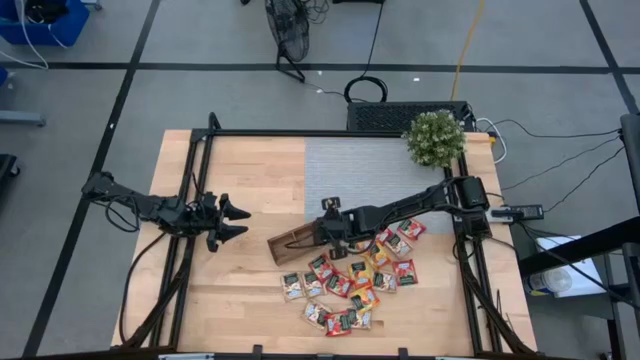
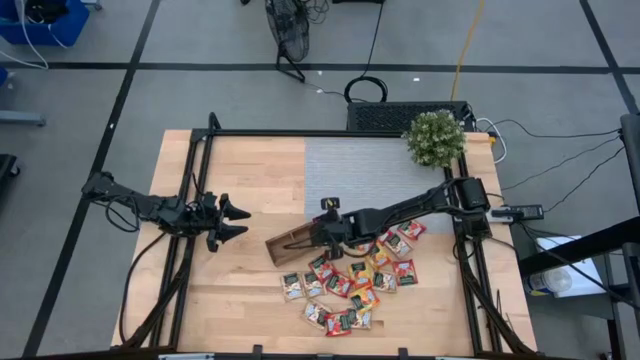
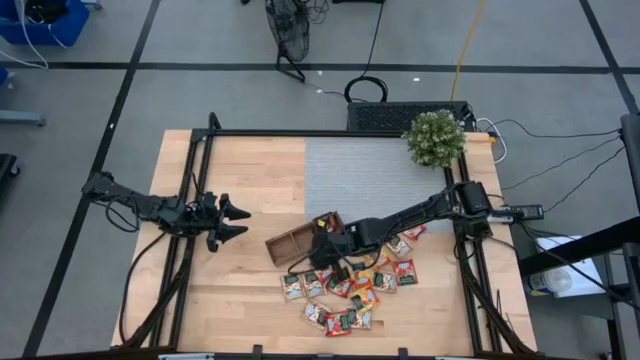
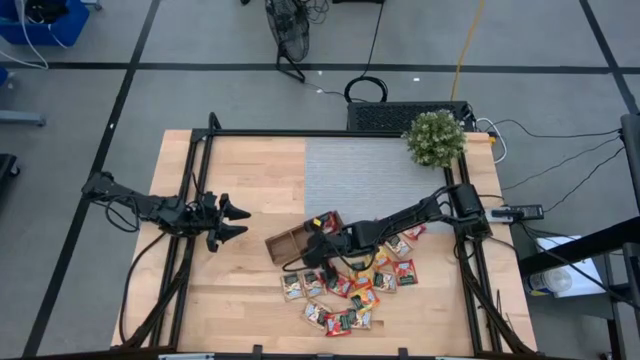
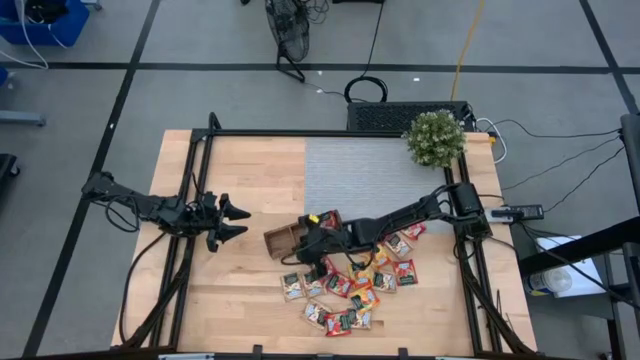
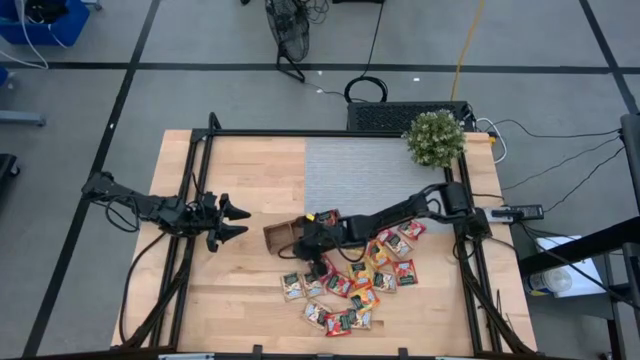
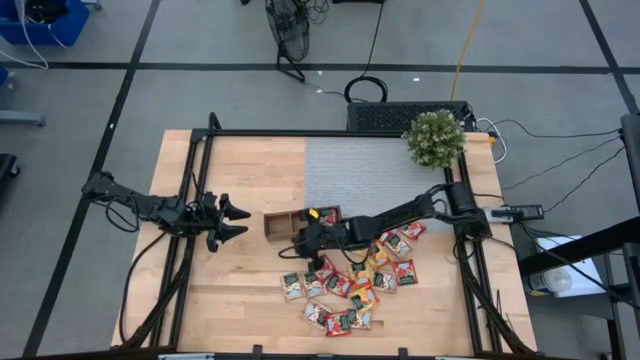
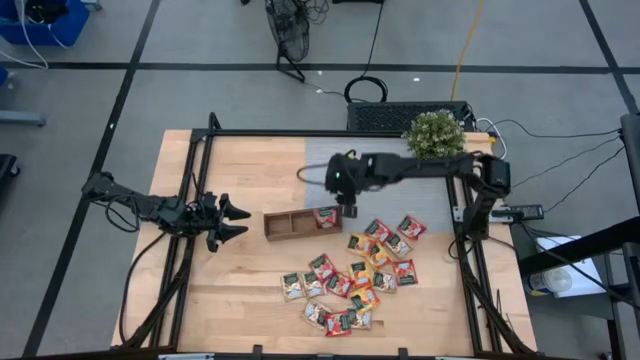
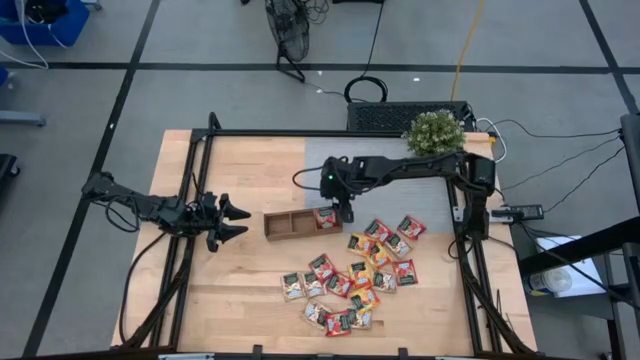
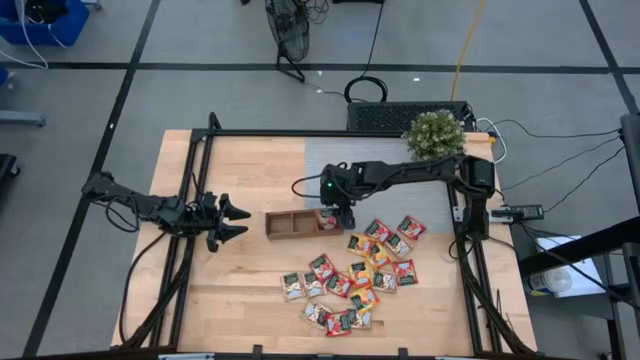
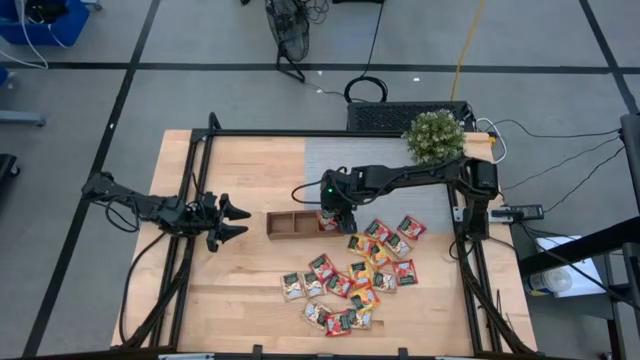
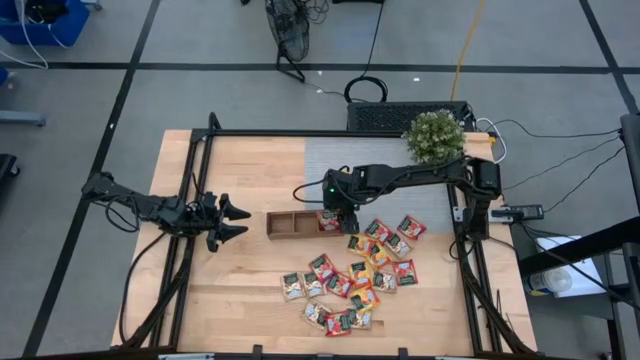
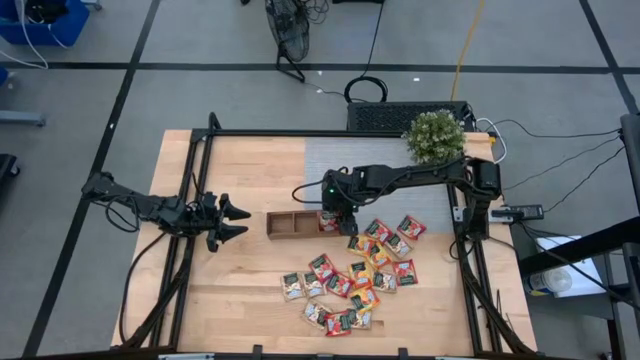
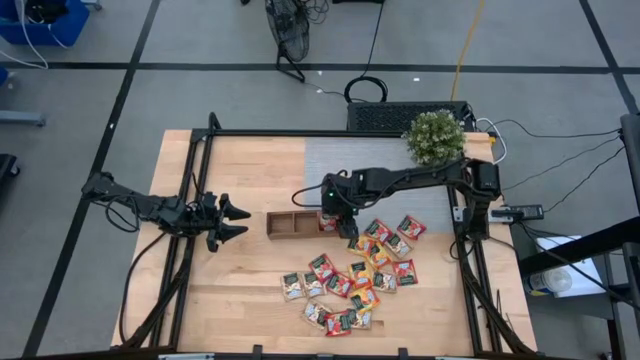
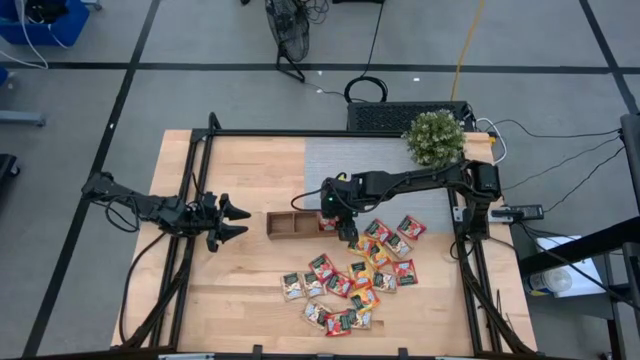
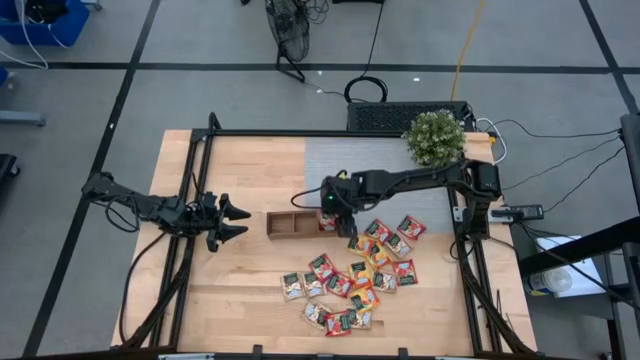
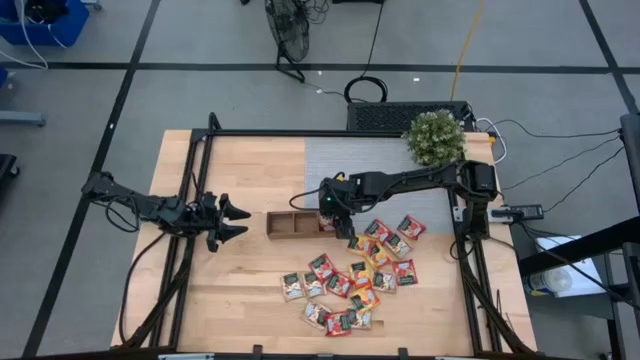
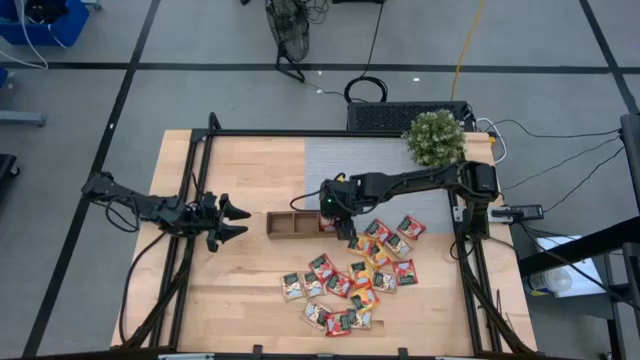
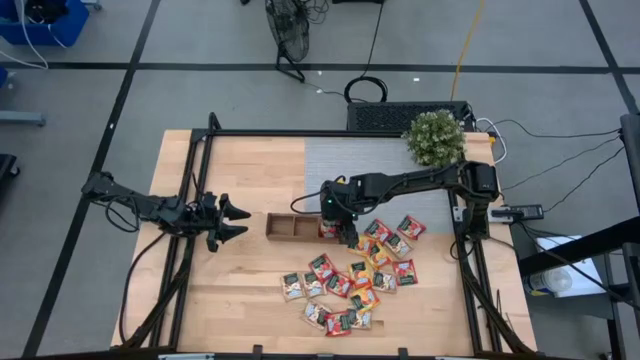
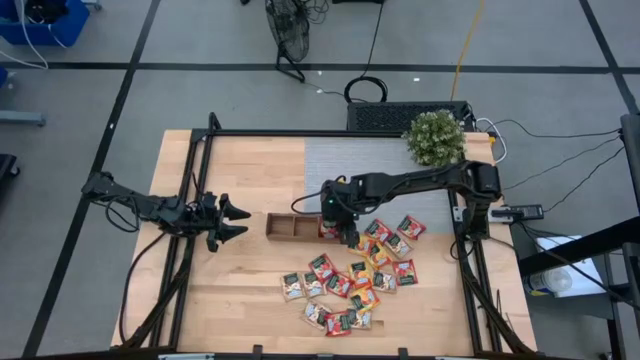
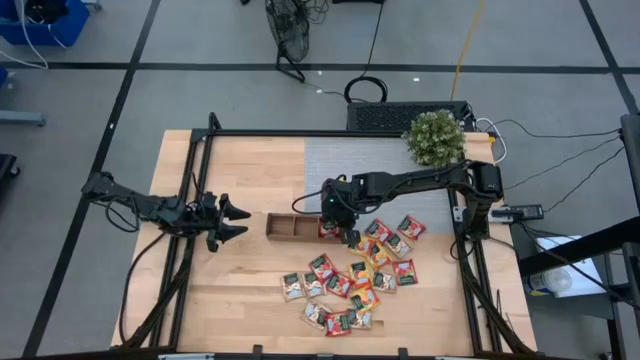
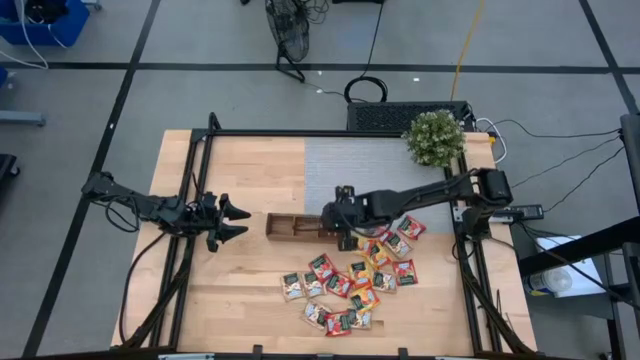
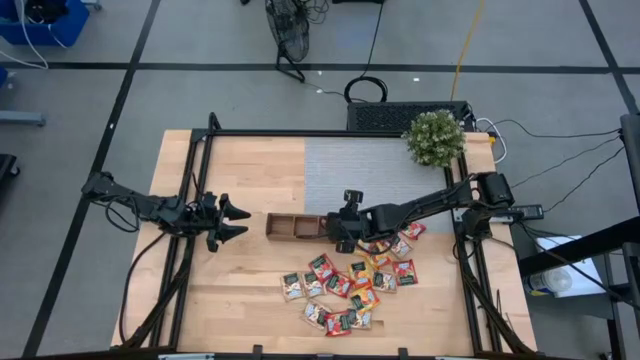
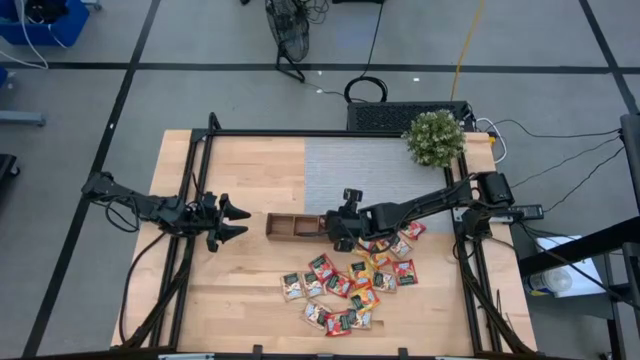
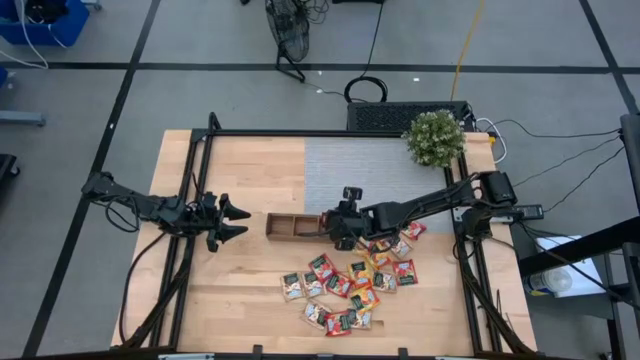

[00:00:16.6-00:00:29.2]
Task: Pick & Place Tea
Put the red tea bag into the right section of the wooden organizer

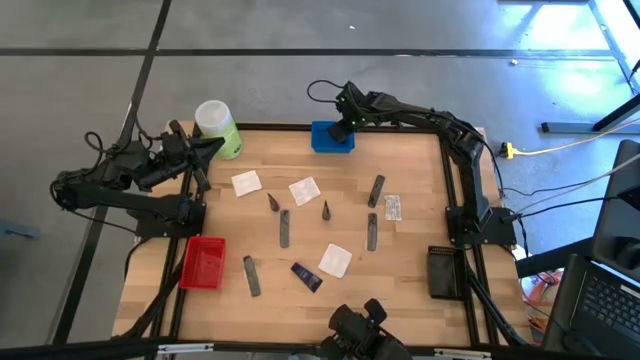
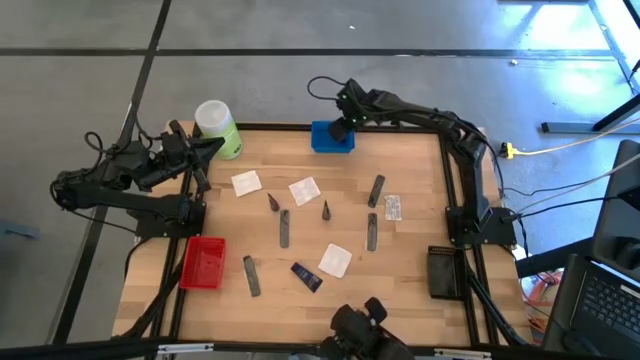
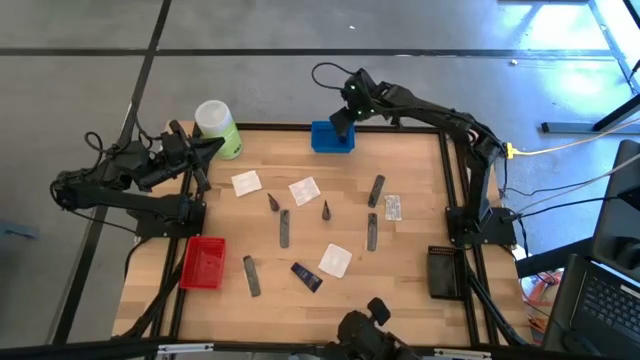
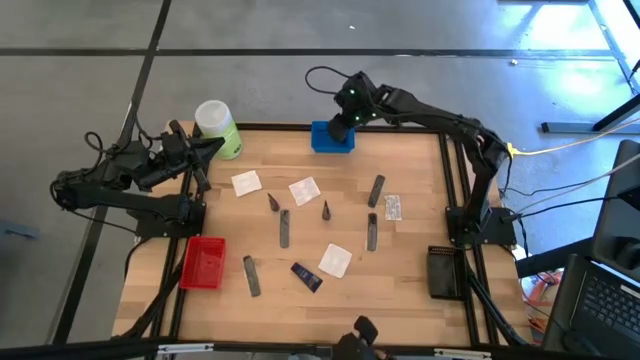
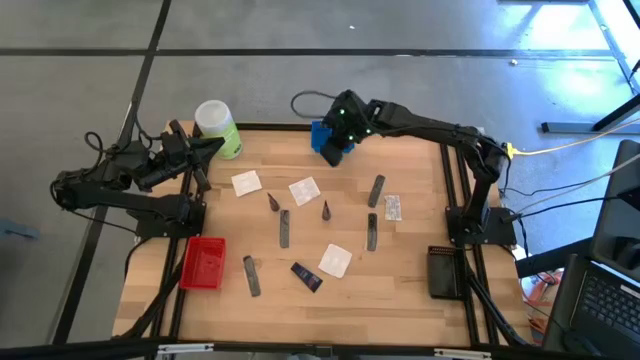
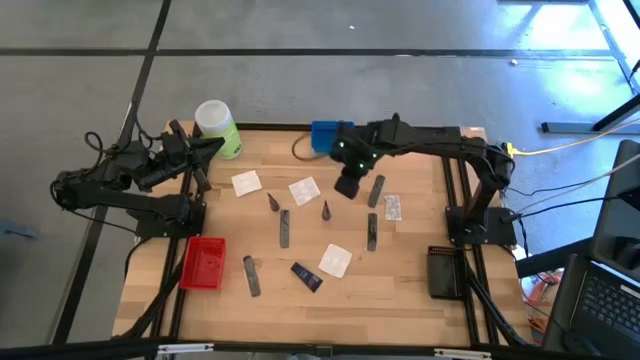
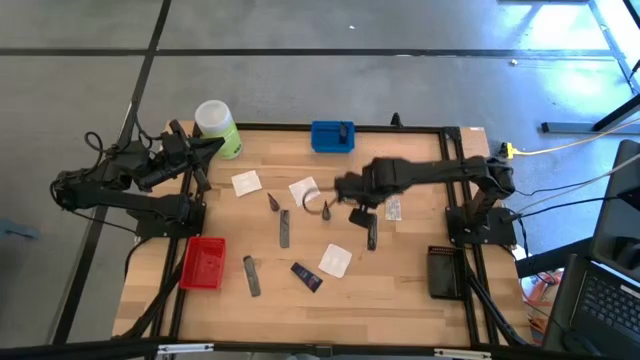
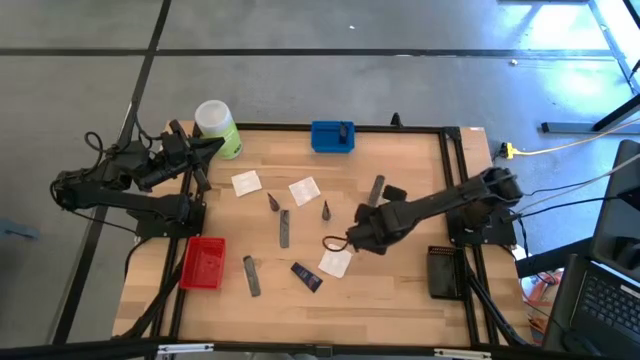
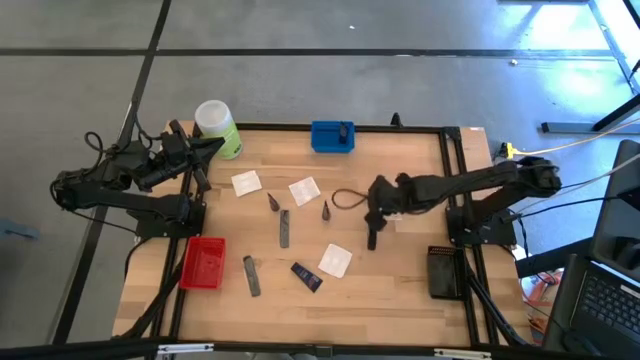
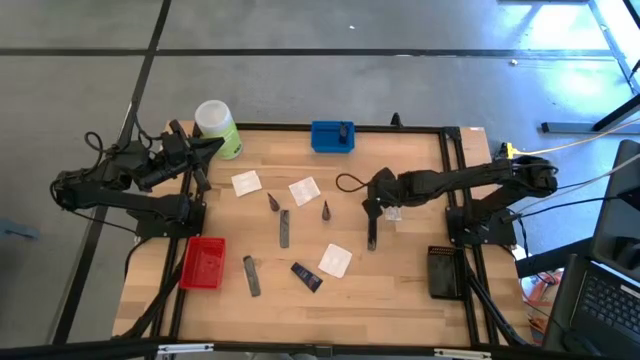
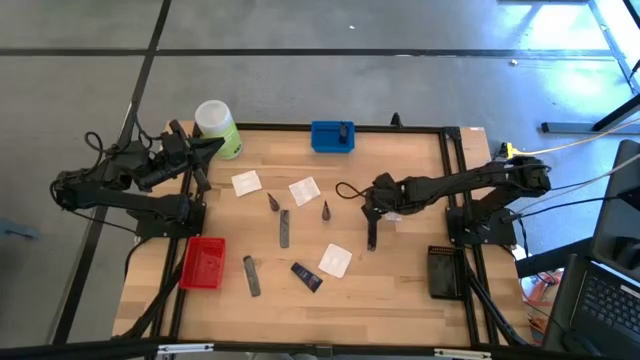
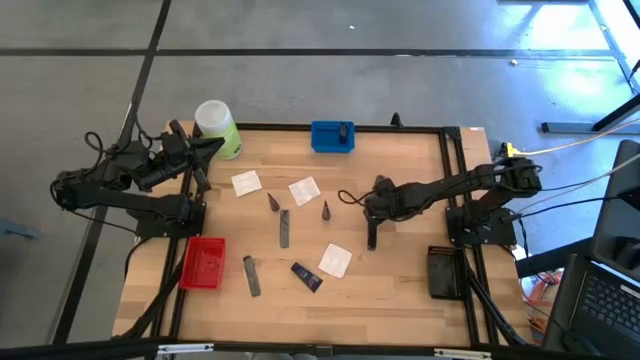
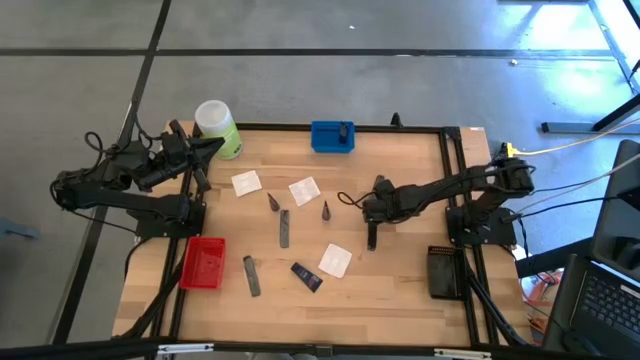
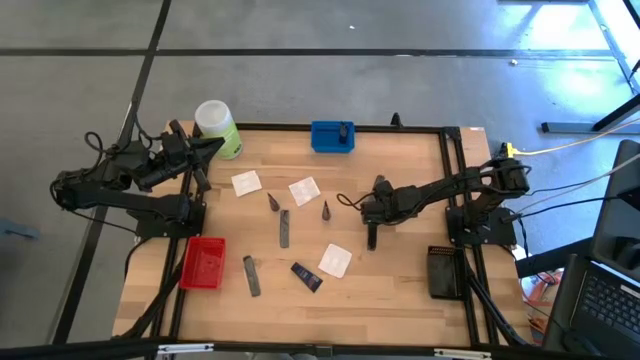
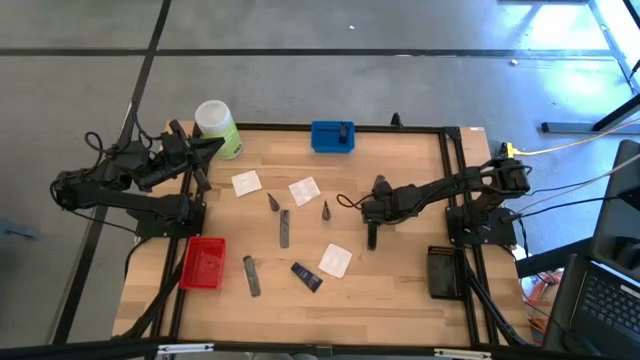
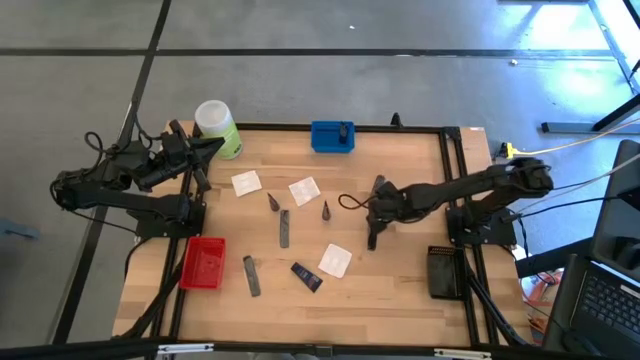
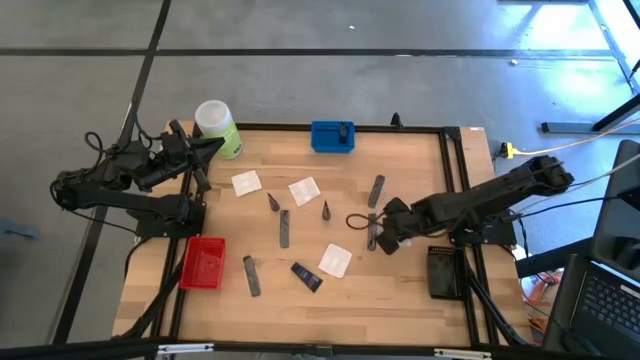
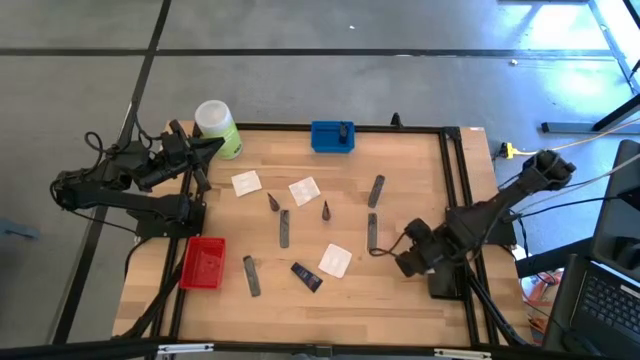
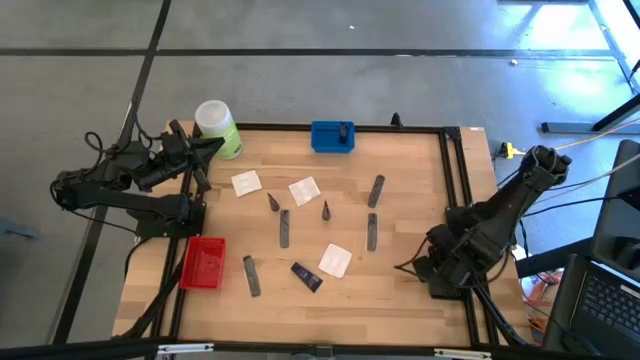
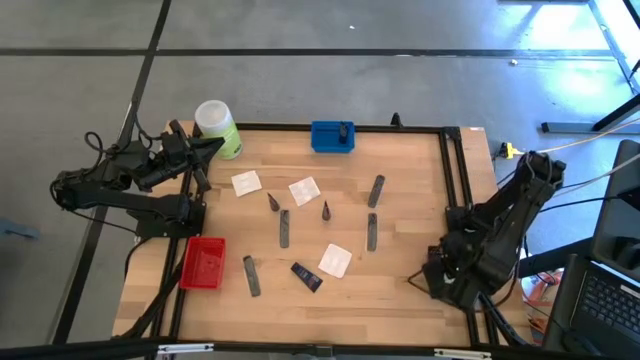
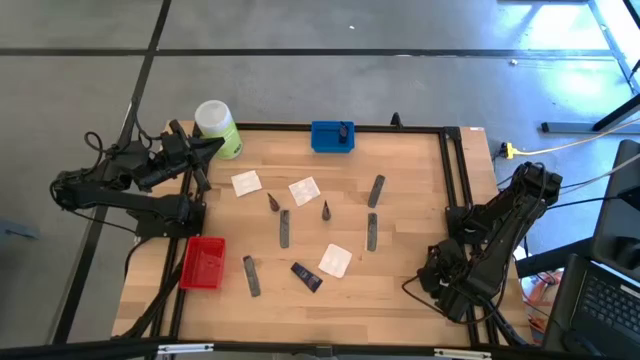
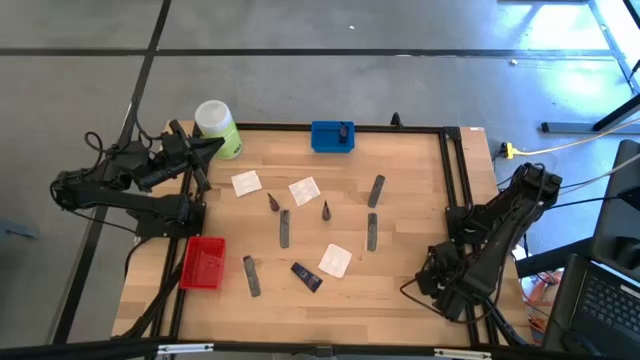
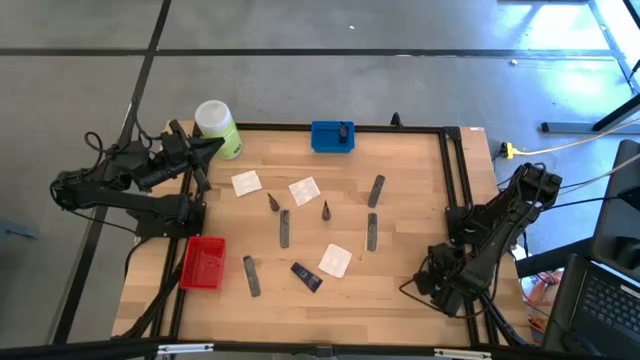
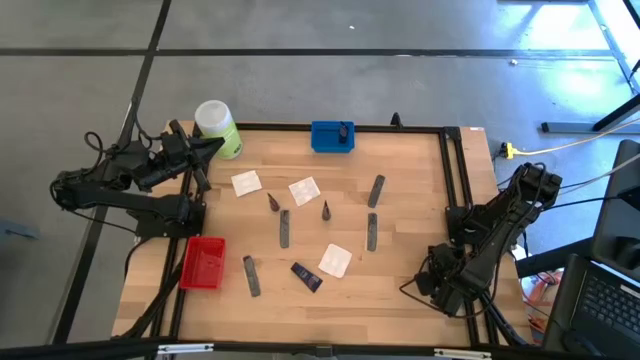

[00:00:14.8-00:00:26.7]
Task: Pick & Place Travel size toiletries
Put the white bandage pad into the black basket
